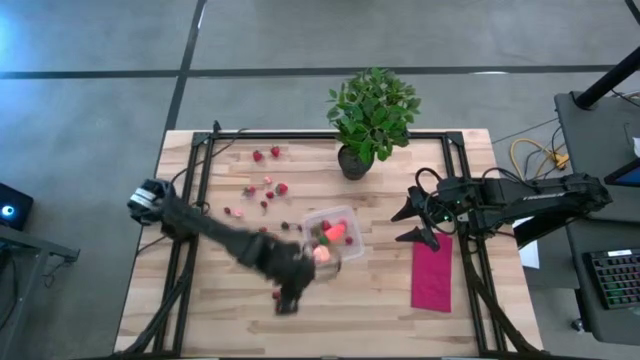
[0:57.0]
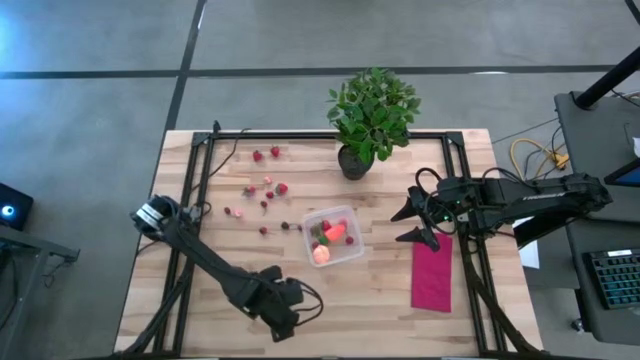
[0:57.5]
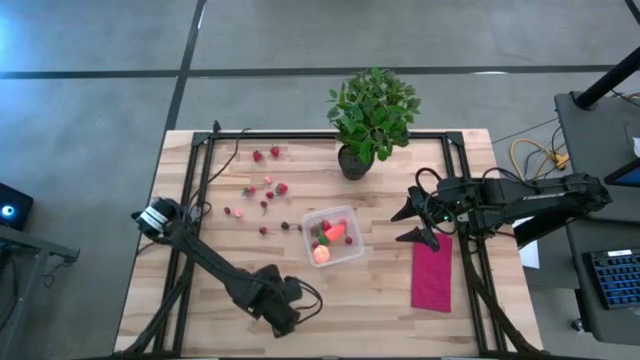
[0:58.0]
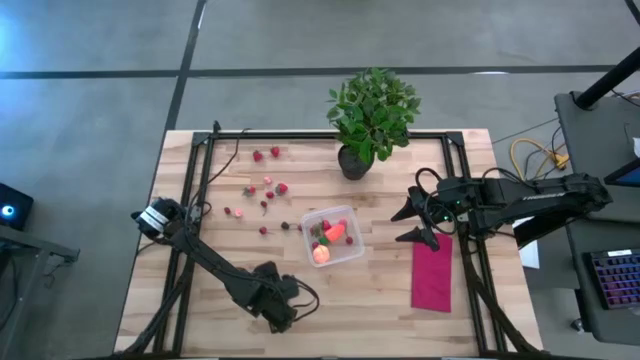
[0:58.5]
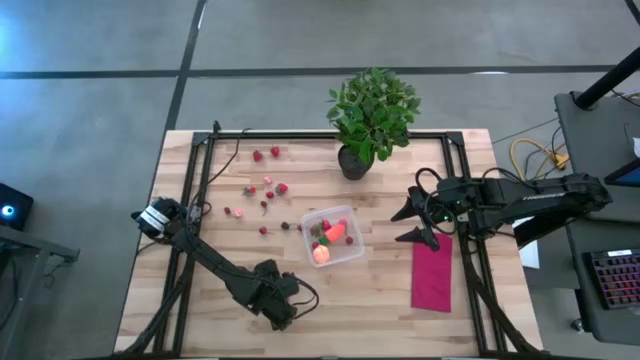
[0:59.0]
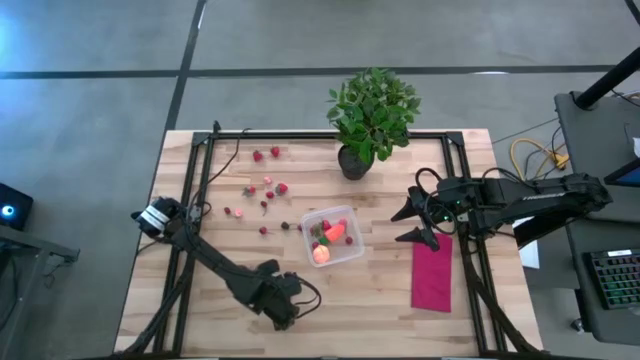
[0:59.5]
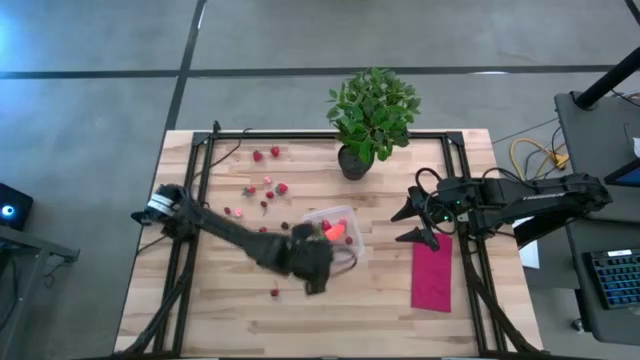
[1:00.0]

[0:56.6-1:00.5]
Task: Pick and placing Produce into tupperware
Put the red strawberry into the transparent bin

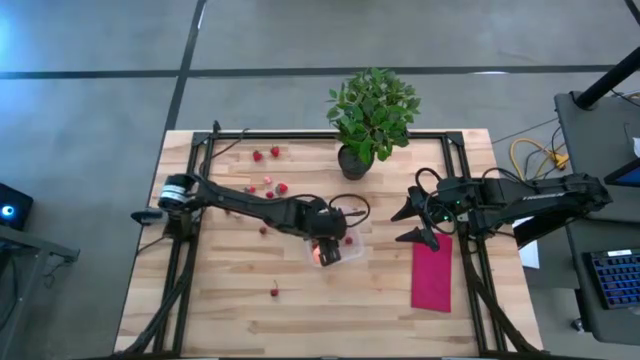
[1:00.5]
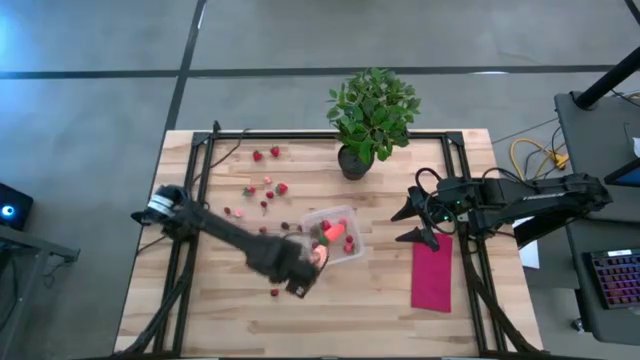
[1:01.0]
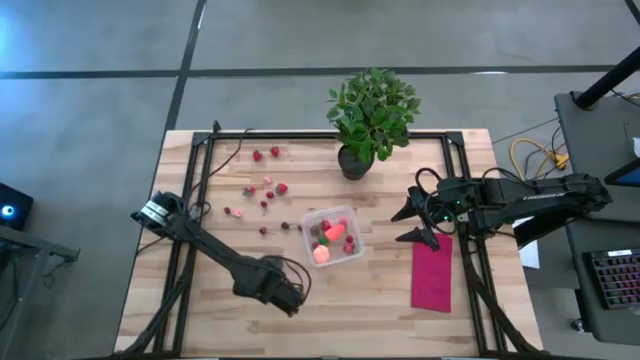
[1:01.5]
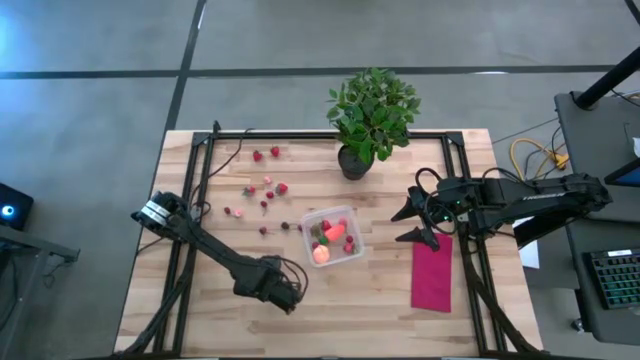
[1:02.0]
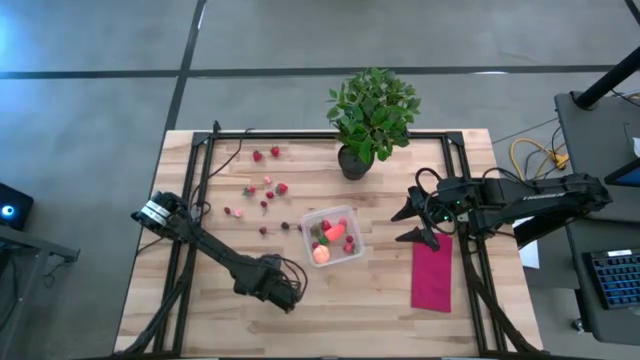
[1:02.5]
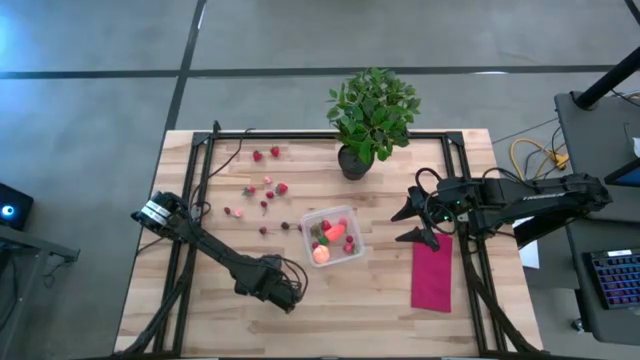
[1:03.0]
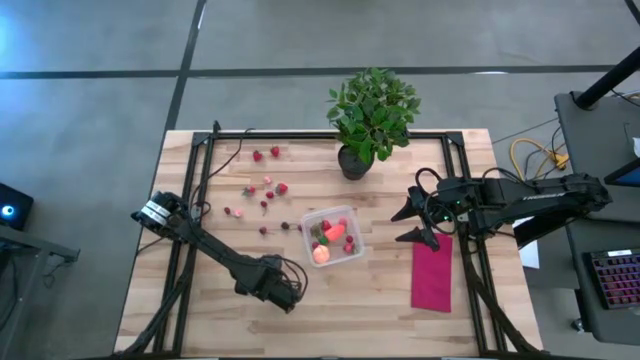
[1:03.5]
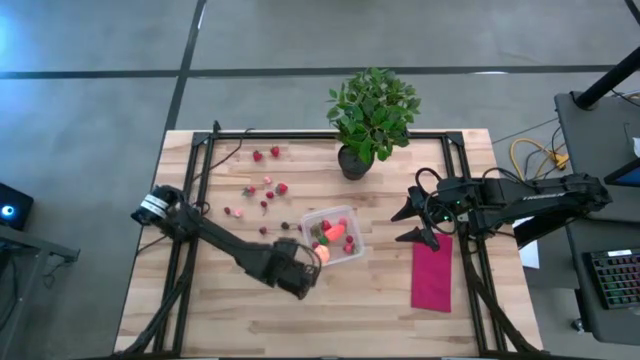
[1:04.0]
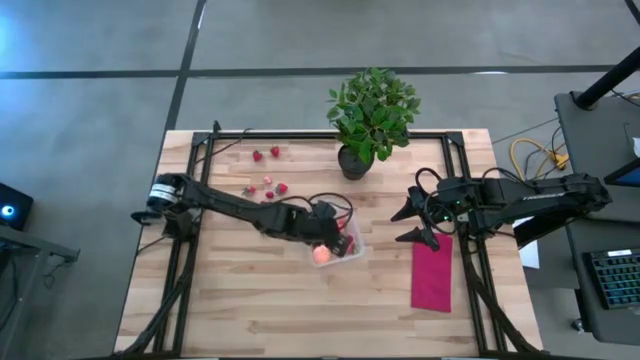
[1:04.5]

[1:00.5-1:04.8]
Put the red cherry into the transparent bin

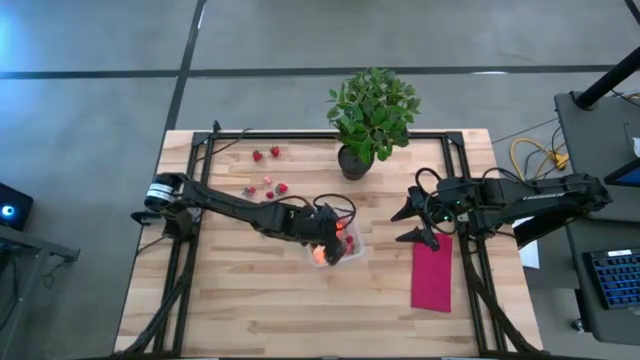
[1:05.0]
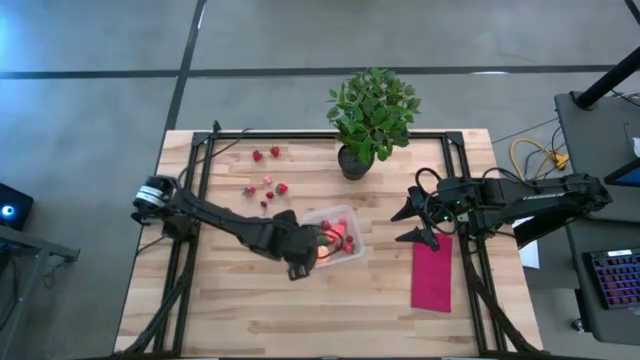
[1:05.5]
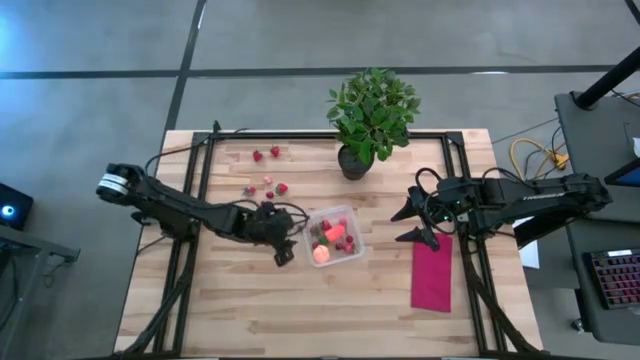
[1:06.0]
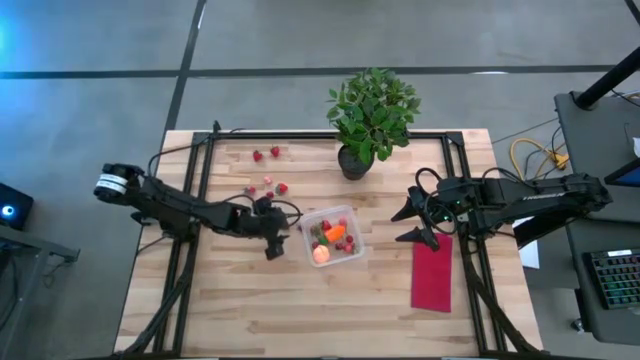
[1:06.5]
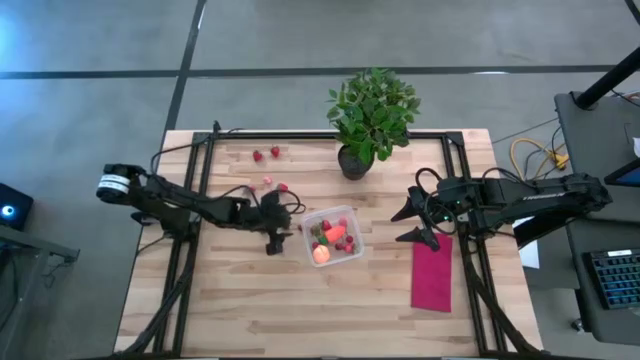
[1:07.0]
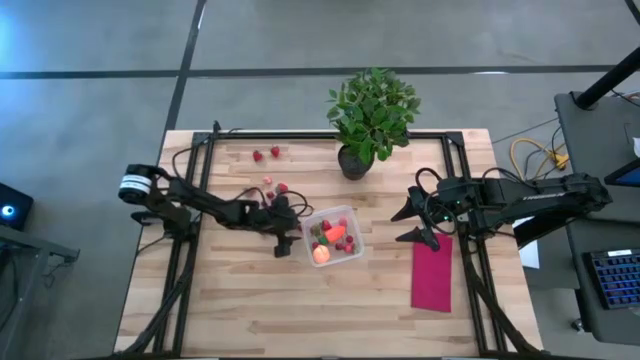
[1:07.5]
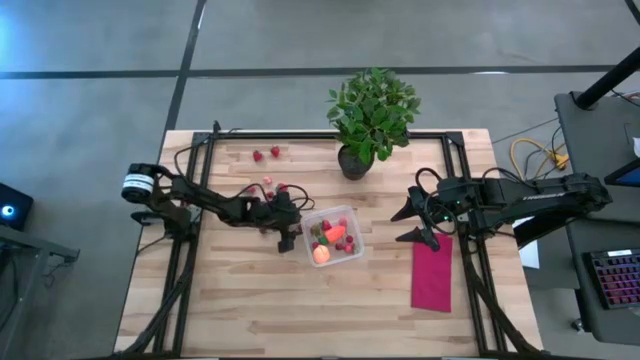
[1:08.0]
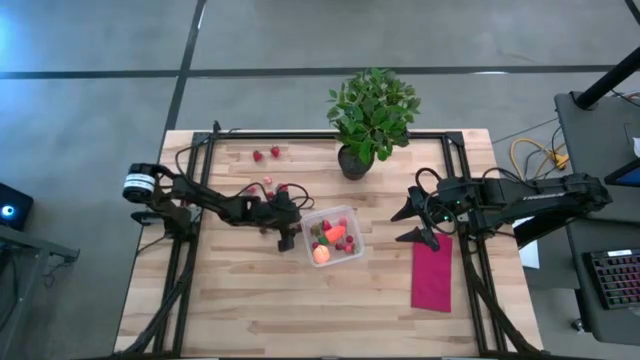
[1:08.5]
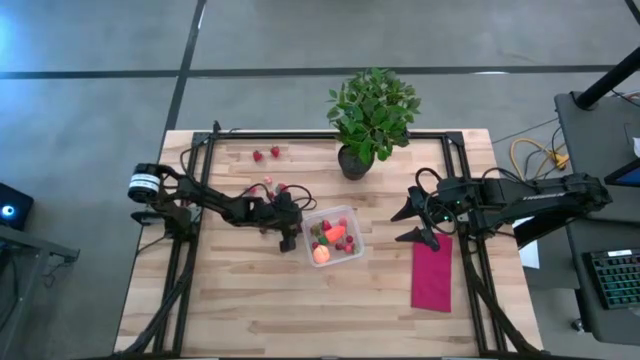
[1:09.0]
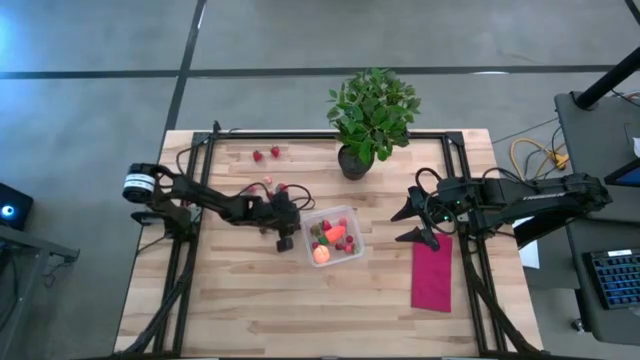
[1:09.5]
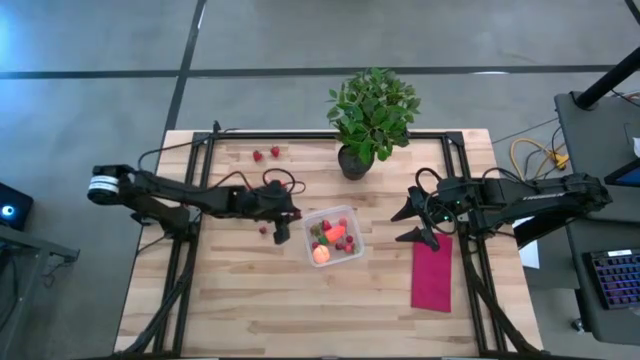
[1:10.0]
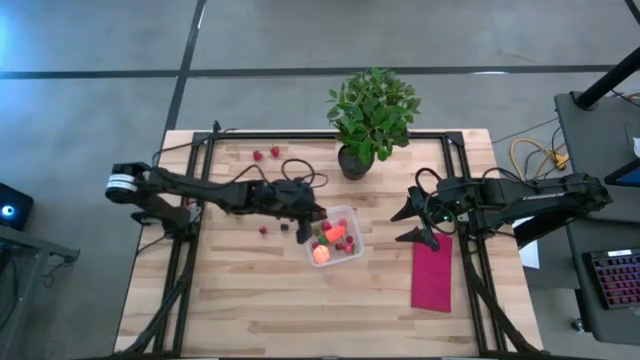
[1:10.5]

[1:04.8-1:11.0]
Put the red cherry into the transparent bin

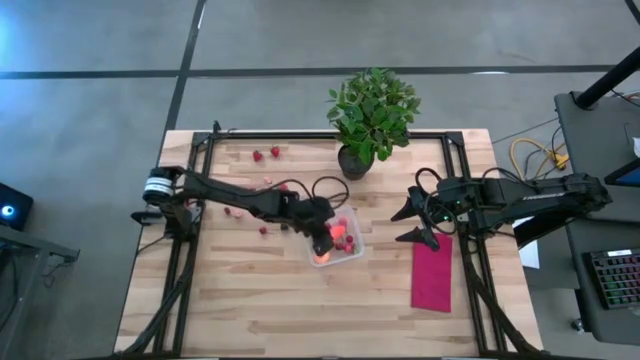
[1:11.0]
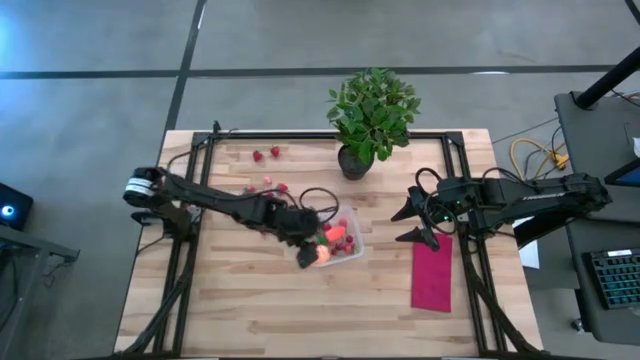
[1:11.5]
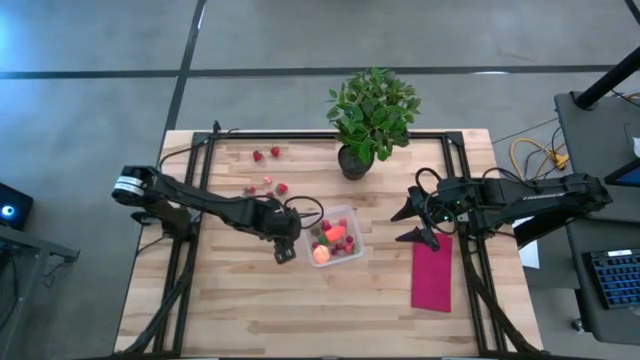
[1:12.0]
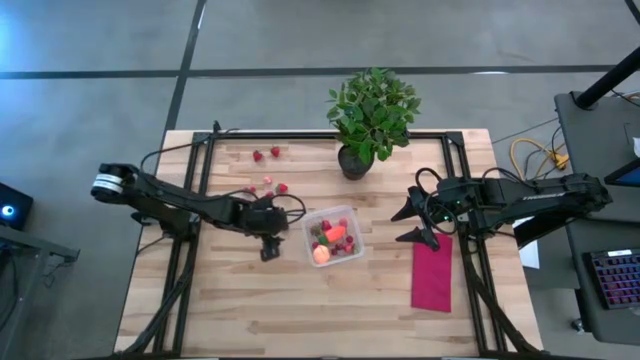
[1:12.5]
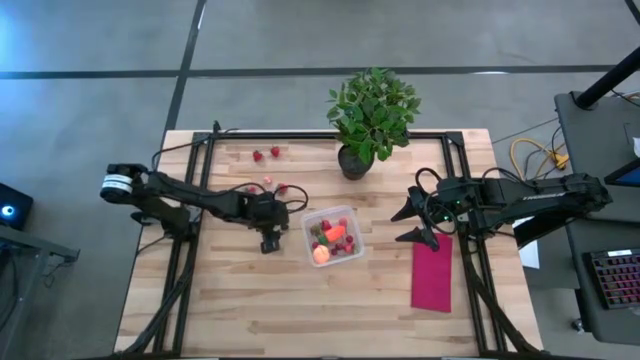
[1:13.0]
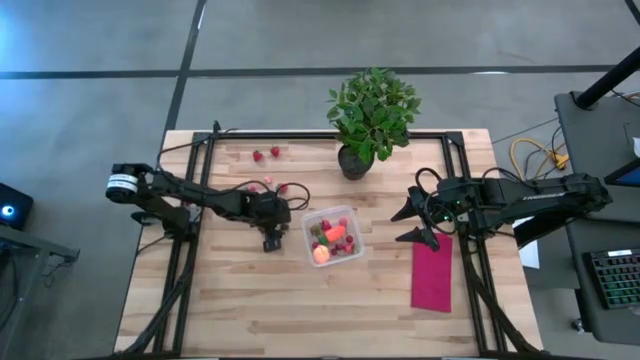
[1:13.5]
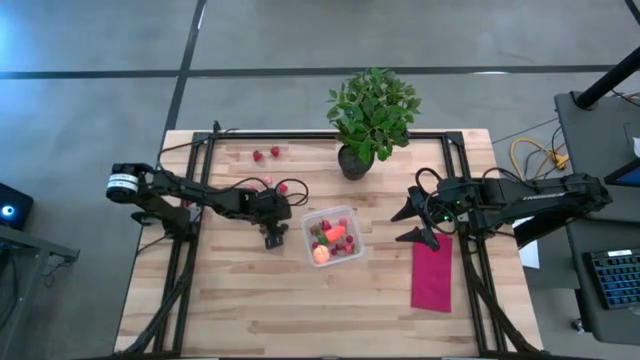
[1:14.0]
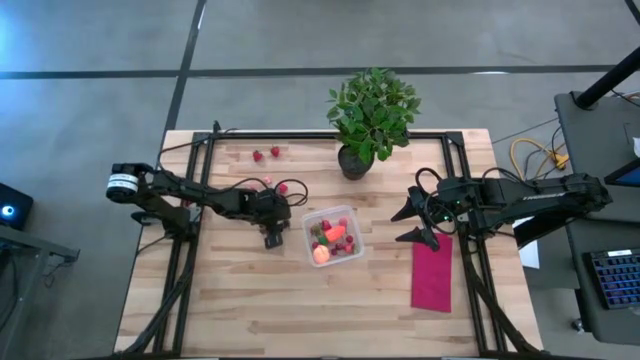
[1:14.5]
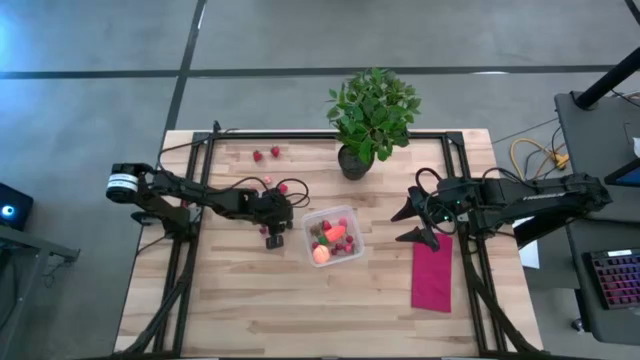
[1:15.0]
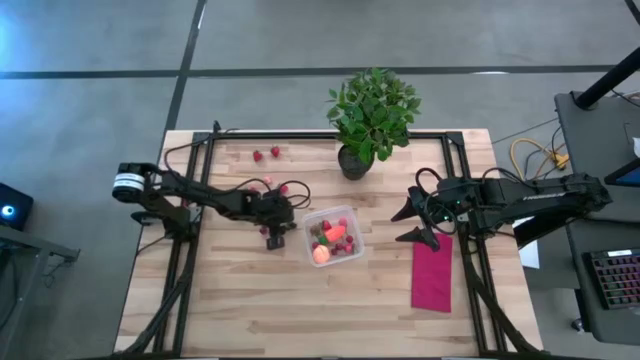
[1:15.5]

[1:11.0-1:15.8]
Put the blackberry into the transparent bin

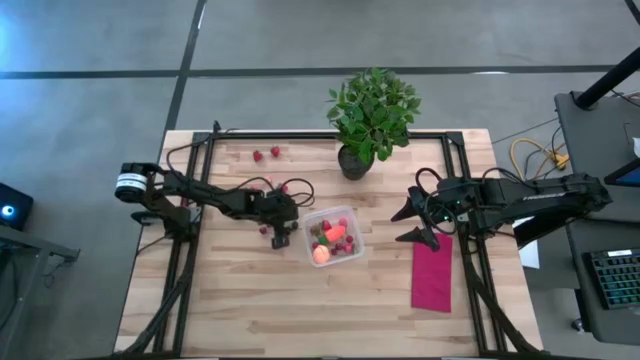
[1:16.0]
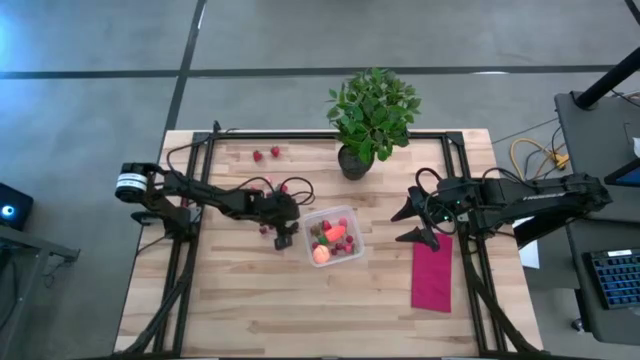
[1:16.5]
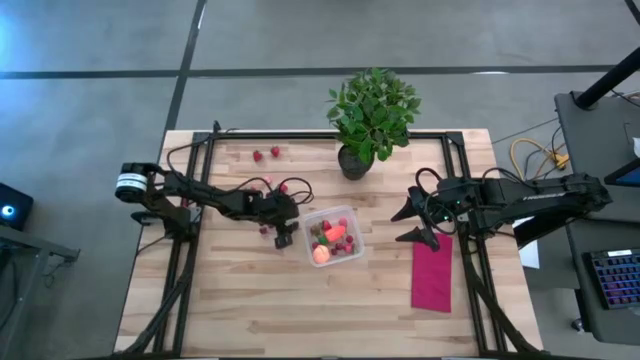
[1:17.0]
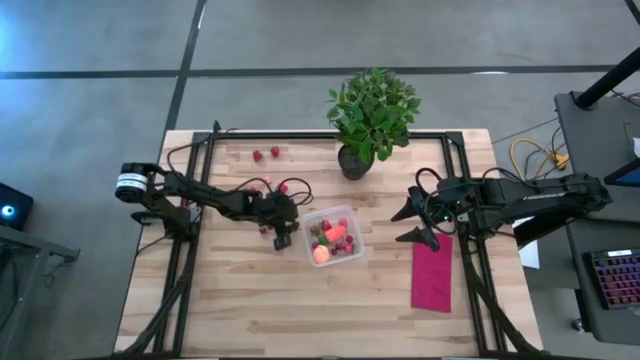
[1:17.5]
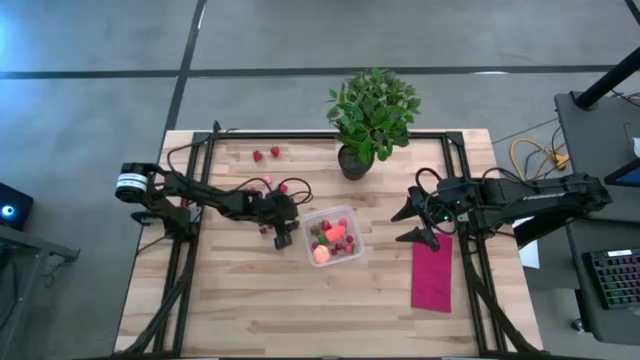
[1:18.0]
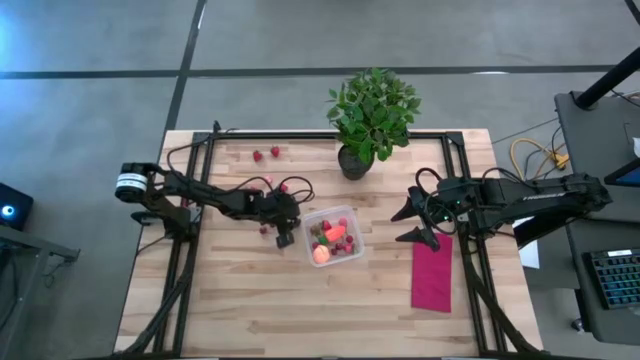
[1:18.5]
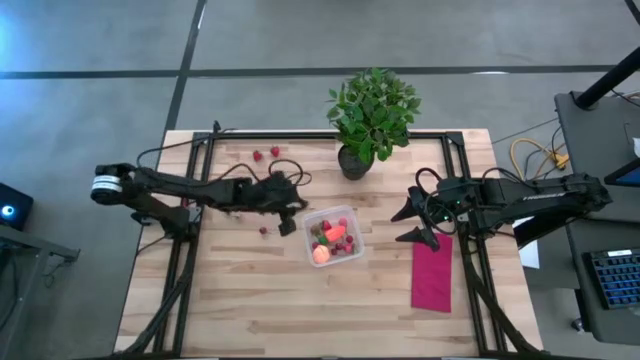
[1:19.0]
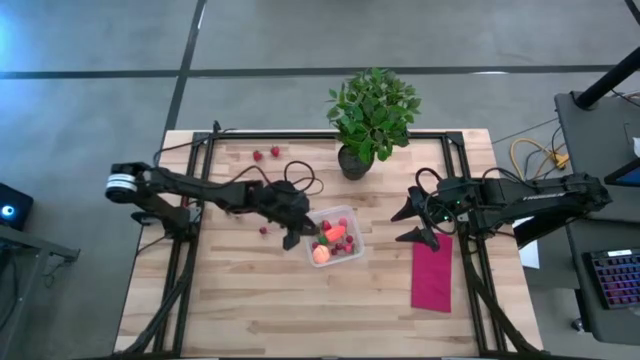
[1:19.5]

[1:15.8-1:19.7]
Put the blackberry into the transparent bin
